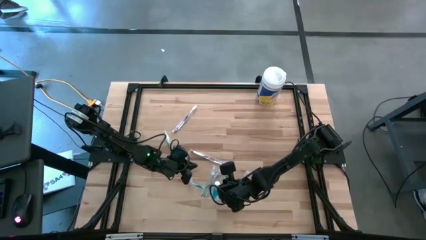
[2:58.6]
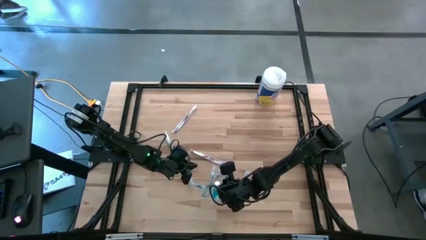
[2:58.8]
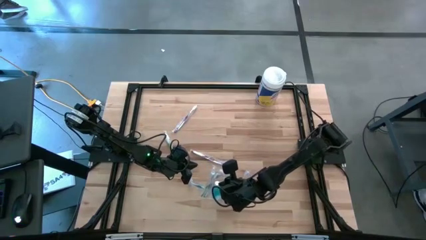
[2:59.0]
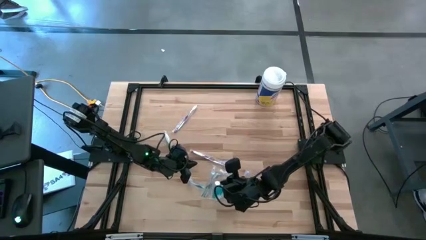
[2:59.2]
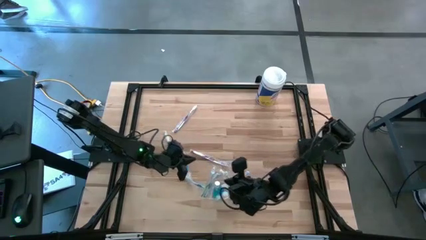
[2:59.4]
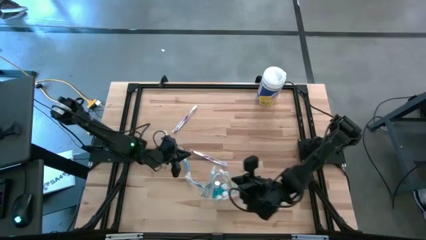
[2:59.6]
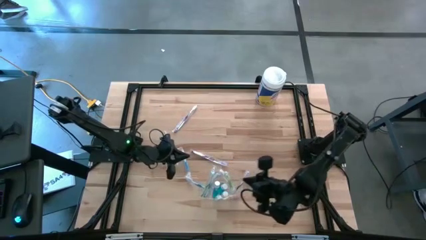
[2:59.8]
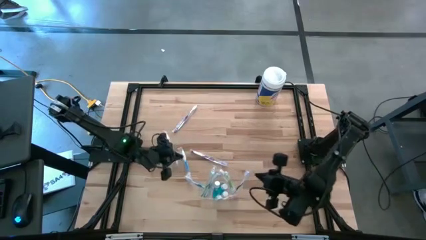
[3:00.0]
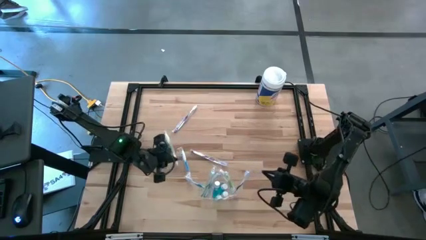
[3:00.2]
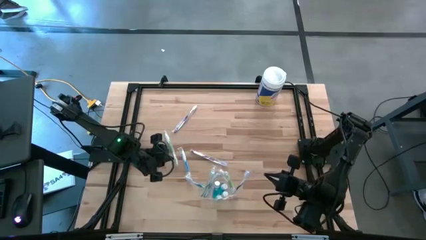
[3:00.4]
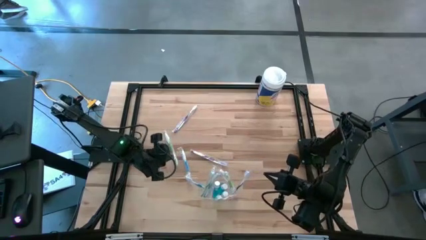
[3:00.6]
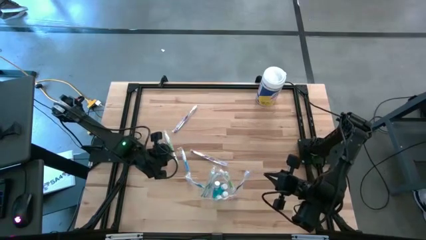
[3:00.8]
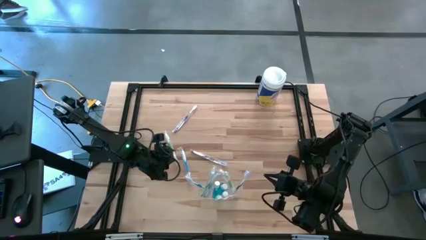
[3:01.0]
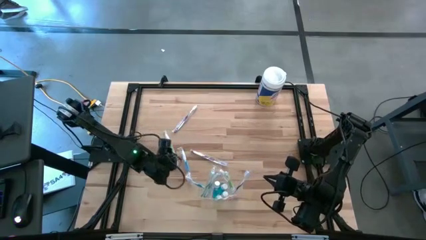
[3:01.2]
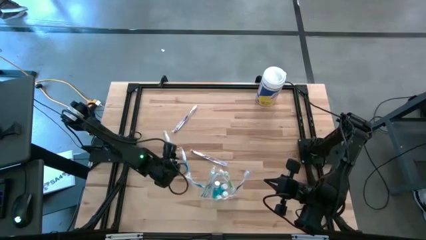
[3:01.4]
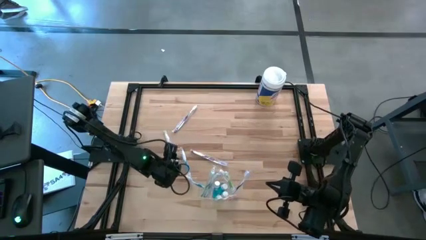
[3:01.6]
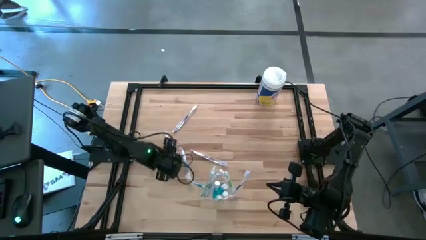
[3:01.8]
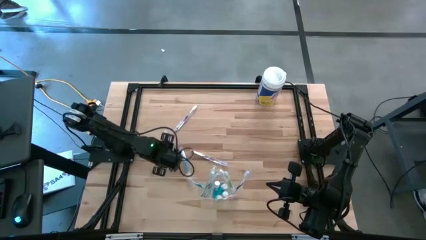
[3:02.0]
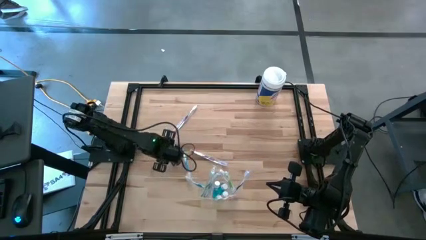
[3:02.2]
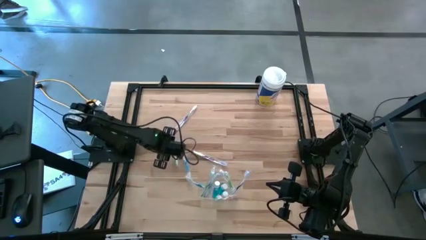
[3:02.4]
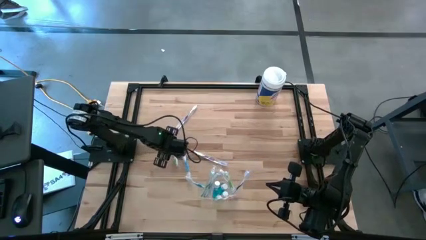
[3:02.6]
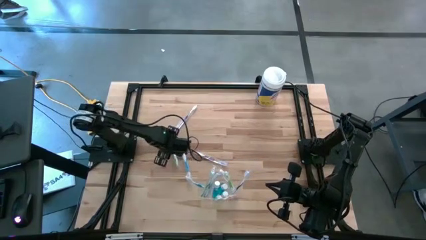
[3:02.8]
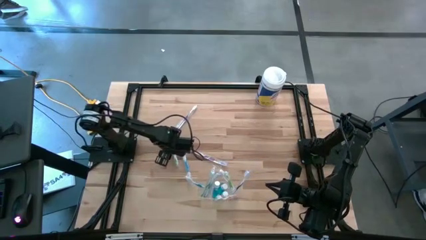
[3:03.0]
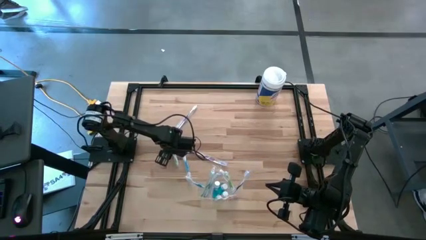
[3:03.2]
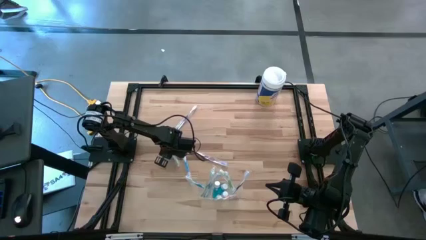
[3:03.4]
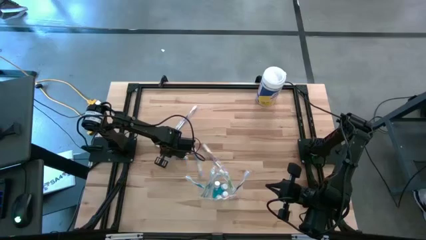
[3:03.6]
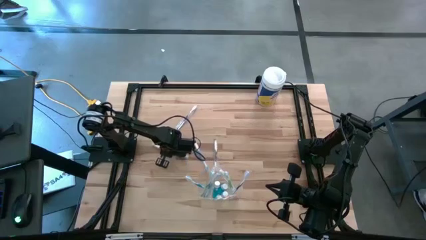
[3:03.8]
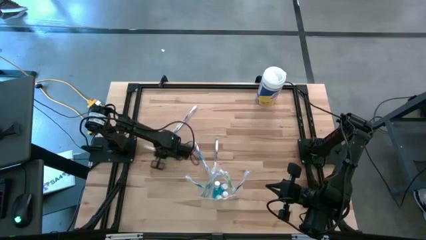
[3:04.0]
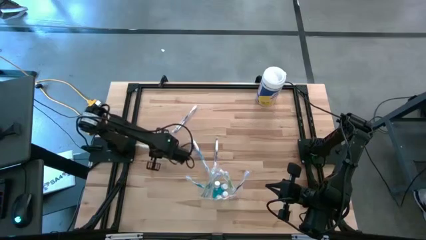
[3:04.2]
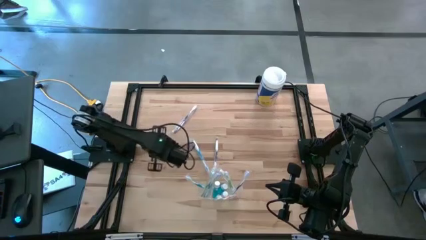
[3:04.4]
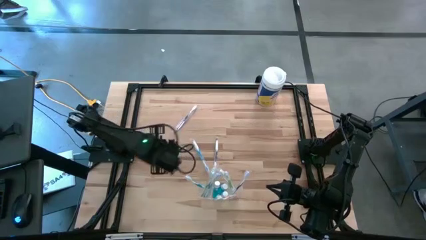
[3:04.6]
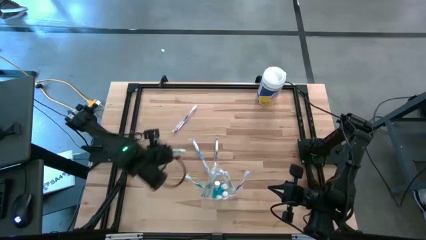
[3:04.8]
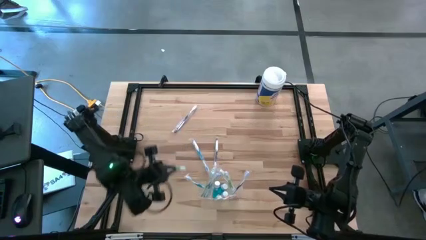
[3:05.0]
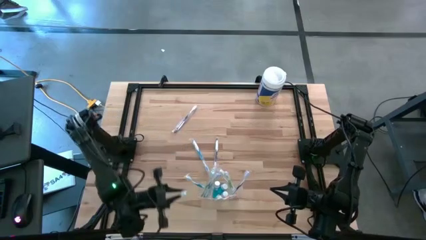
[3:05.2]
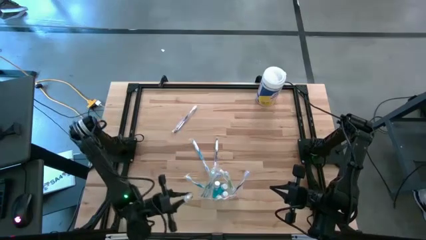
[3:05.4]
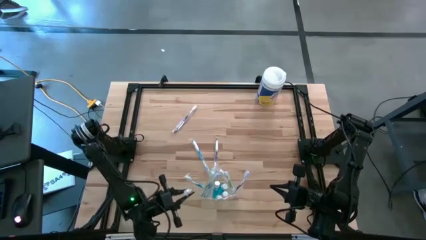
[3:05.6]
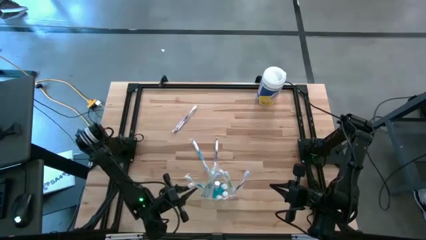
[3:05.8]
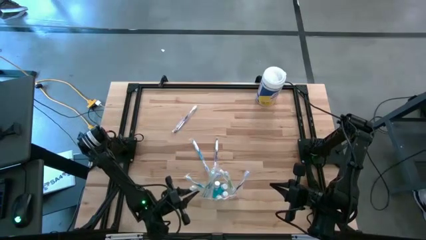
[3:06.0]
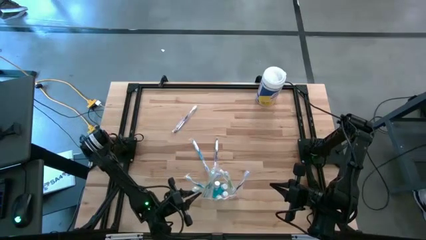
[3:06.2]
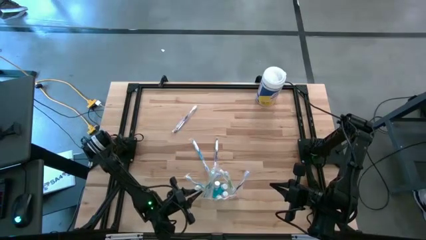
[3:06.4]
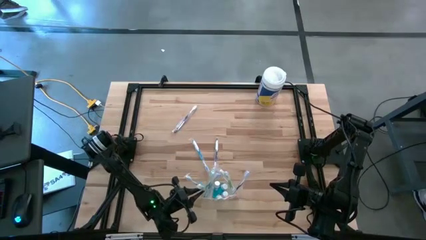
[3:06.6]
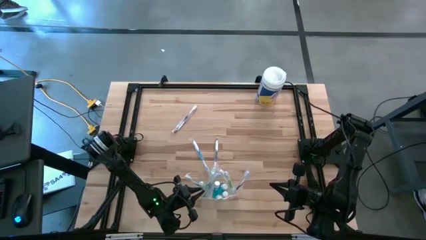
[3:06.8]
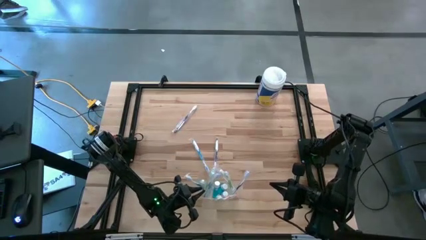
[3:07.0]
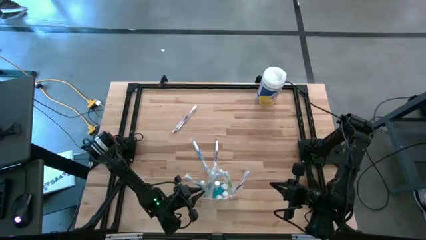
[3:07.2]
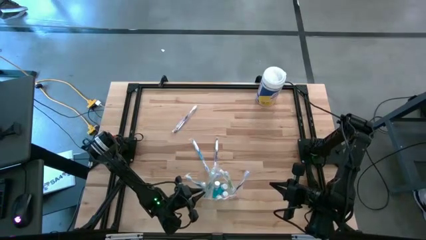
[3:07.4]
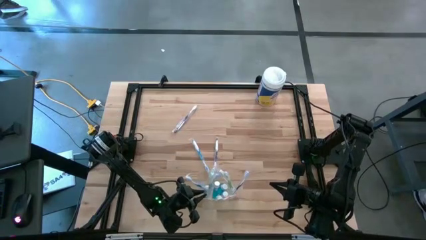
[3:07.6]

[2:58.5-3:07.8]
Task: Pick & Place toothbrushing station
Put the green toothbrush into the transparent organizer

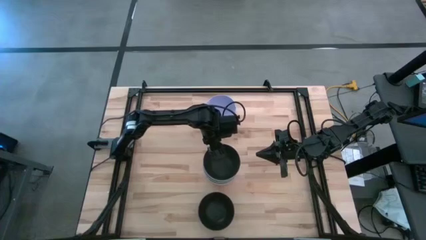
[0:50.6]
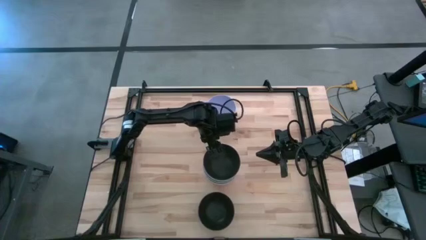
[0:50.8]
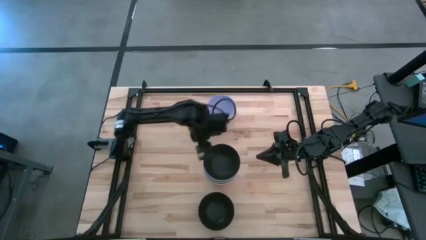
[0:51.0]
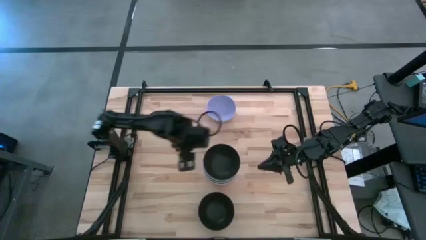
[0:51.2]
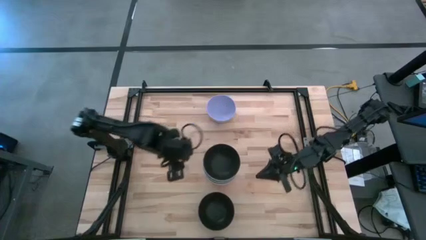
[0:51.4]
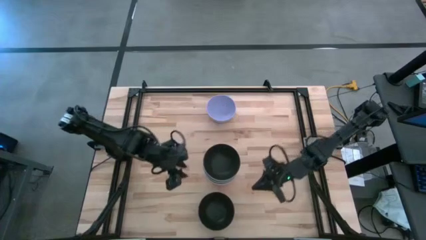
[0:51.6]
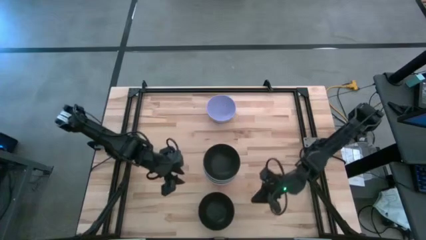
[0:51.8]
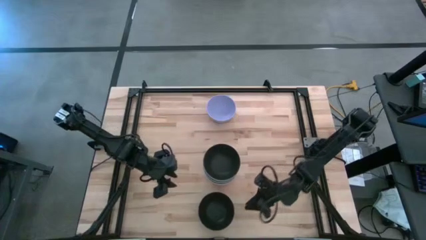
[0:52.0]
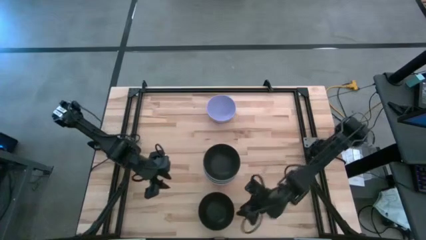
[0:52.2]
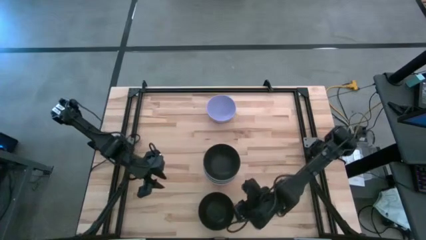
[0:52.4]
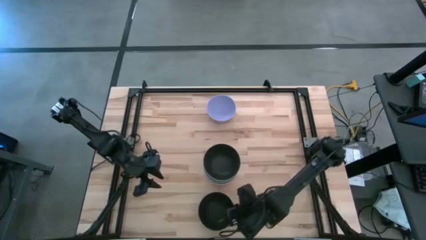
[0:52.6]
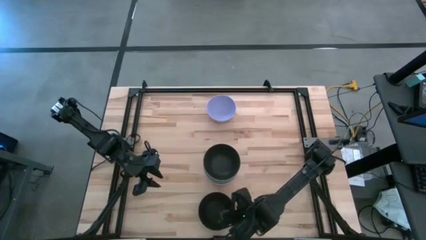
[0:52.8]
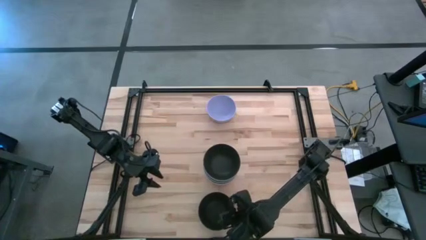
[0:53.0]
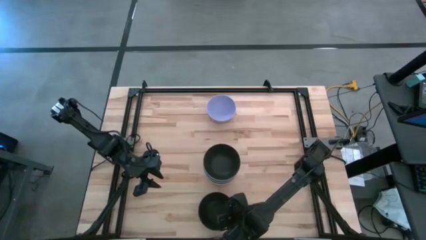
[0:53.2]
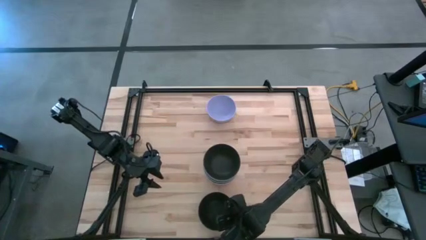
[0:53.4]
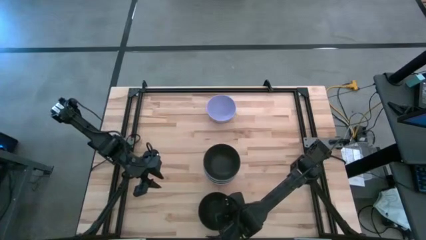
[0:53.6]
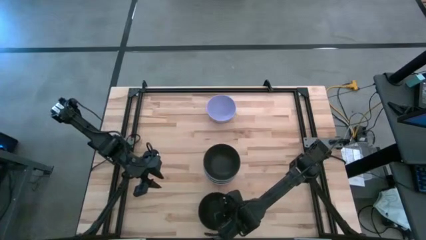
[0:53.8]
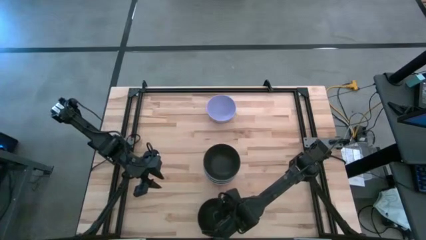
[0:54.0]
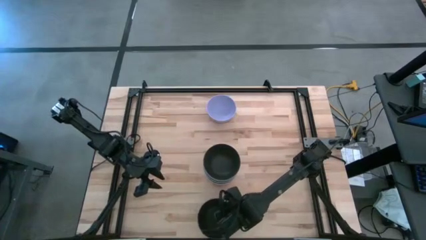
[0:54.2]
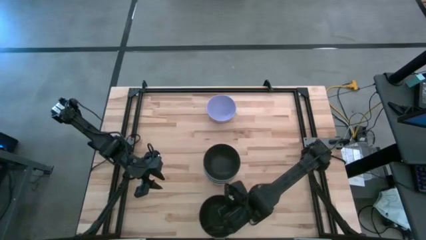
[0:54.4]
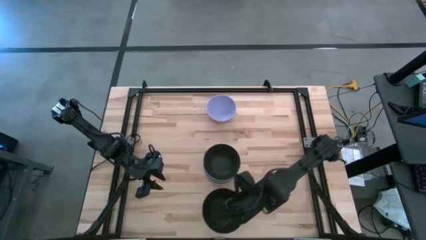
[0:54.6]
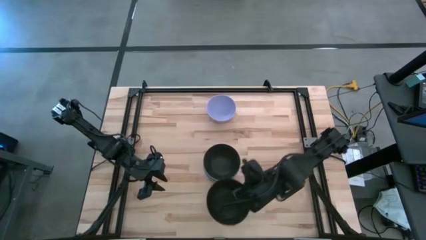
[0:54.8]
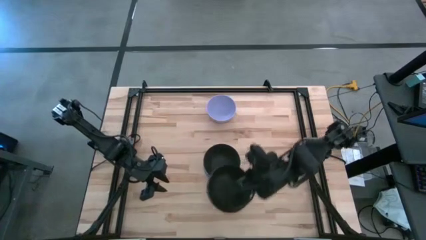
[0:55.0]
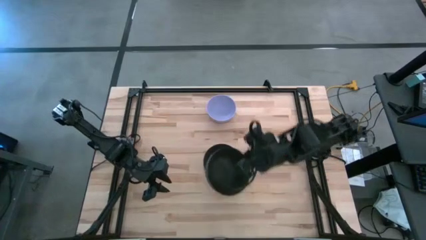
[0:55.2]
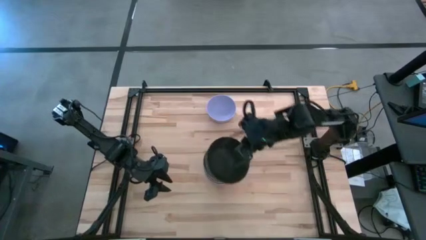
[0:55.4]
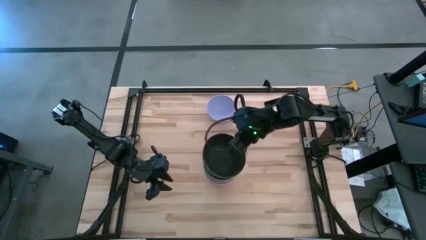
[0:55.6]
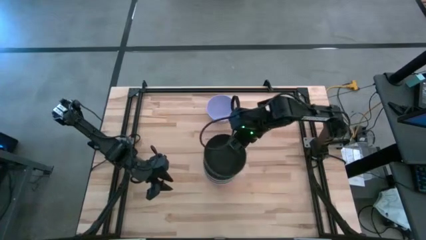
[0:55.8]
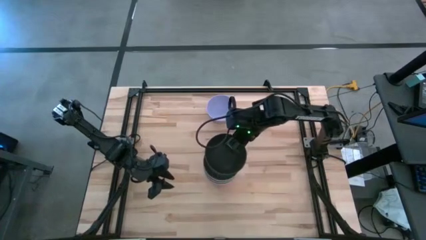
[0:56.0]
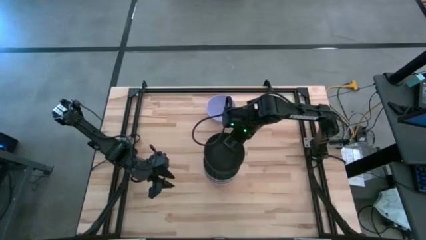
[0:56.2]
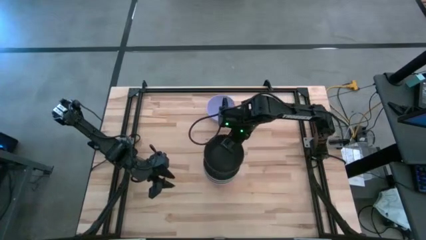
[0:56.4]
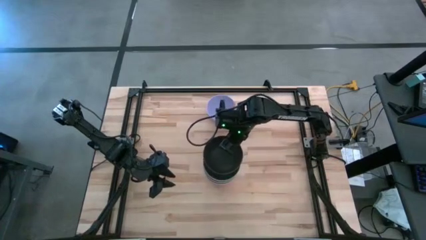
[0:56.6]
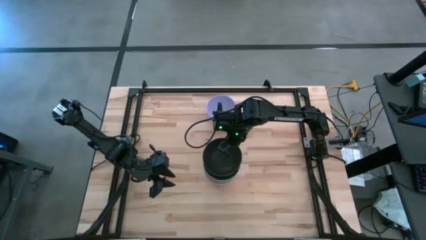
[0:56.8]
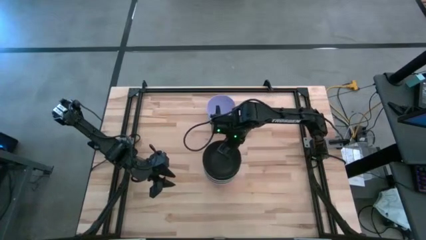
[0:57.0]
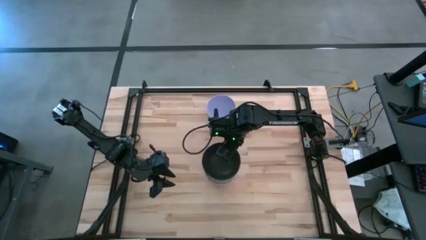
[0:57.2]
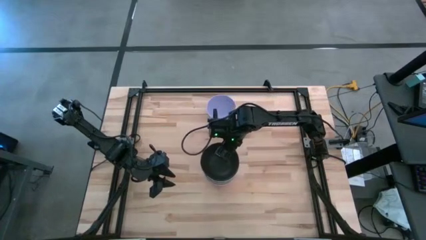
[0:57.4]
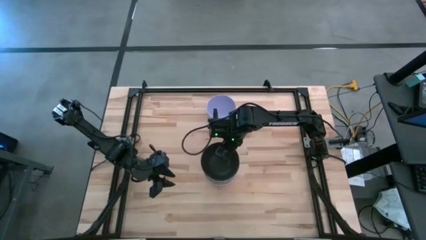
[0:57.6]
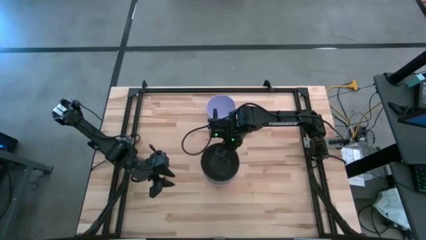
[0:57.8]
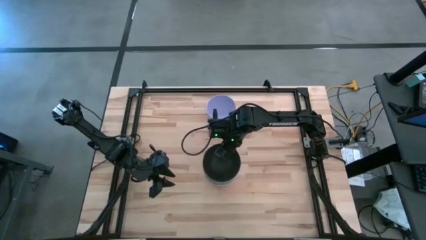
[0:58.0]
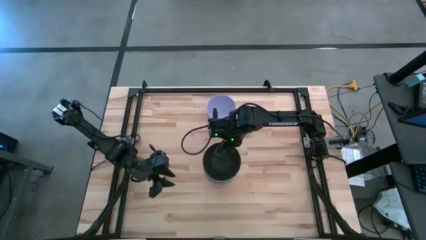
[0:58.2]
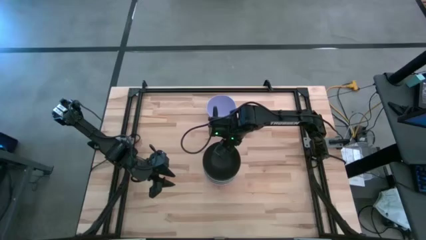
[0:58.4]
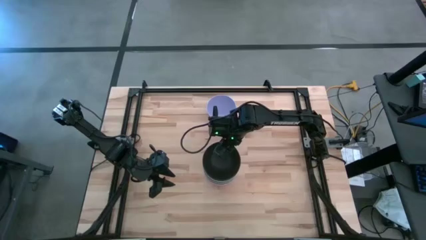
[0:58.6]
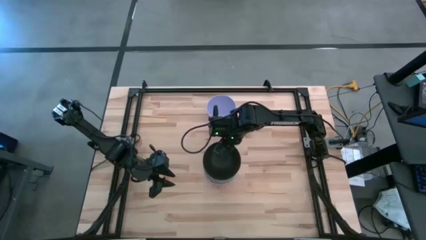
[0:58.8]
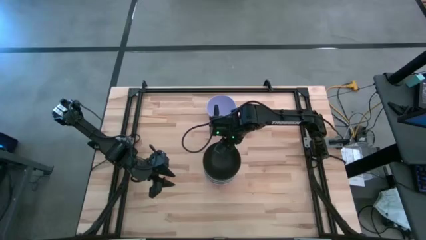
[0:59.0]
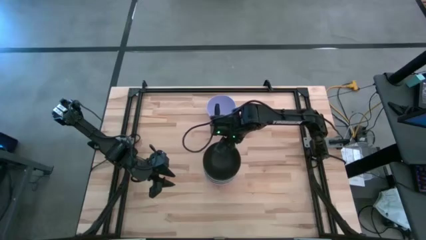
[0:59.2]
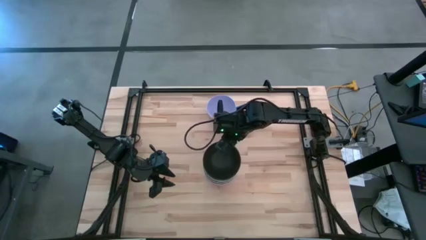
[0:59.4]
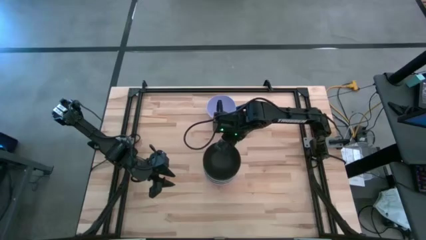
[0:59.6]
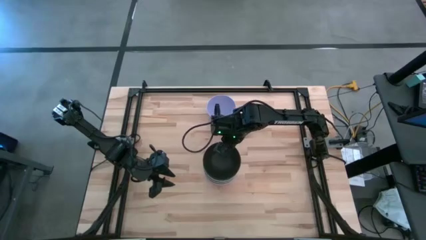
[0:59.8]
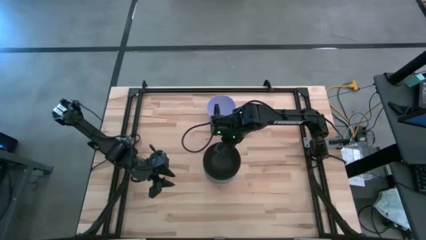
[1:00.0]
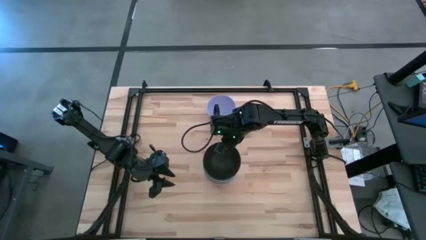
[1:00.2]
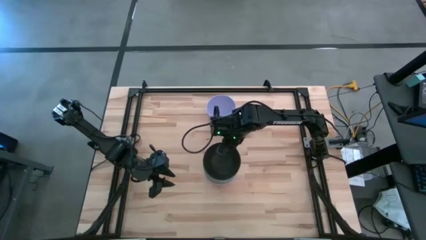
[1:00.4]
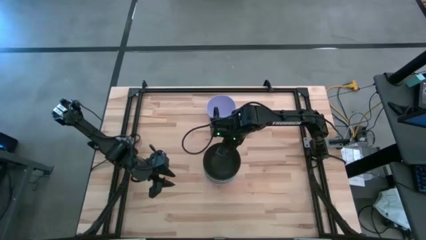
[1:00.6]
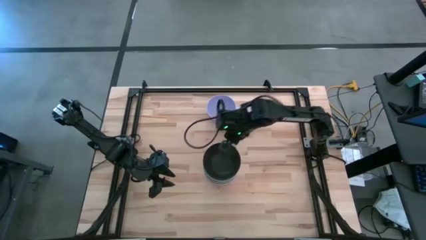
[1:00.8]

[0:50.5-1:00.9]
Task: Nest bowls inside each other
Stack the bottom black bowl on top of the black bowl
